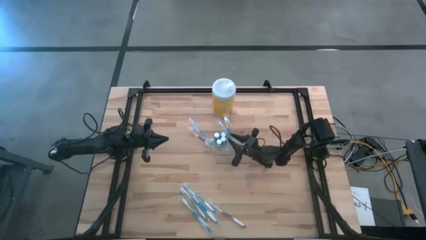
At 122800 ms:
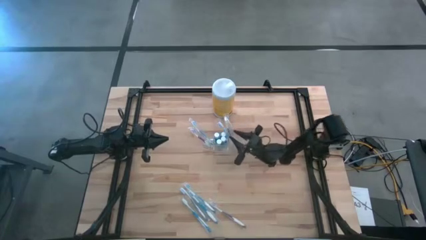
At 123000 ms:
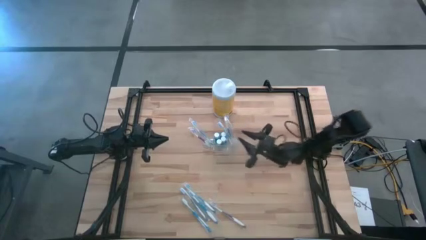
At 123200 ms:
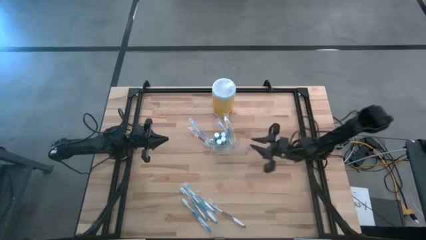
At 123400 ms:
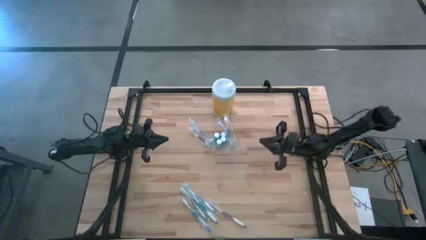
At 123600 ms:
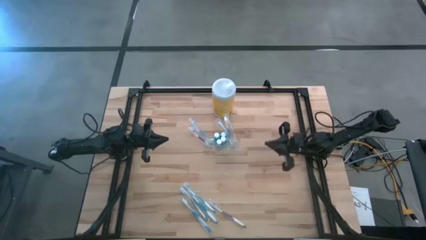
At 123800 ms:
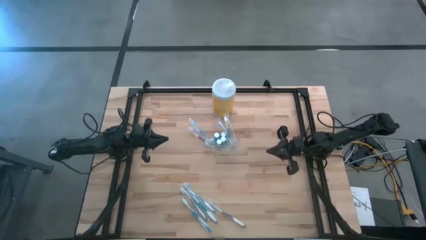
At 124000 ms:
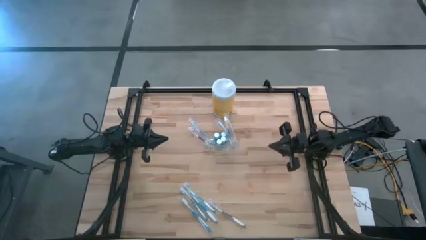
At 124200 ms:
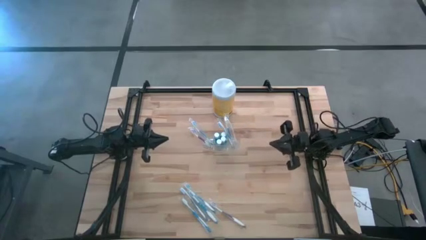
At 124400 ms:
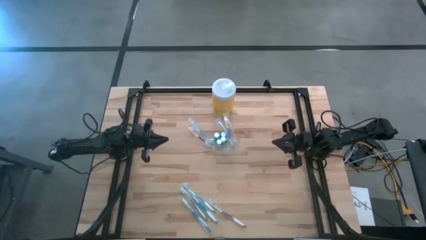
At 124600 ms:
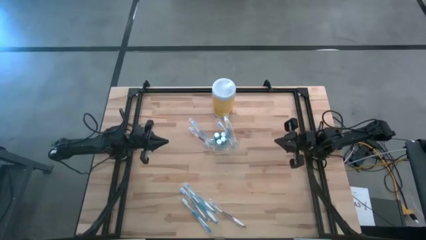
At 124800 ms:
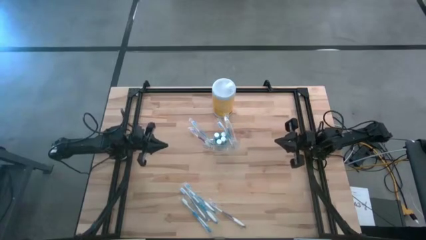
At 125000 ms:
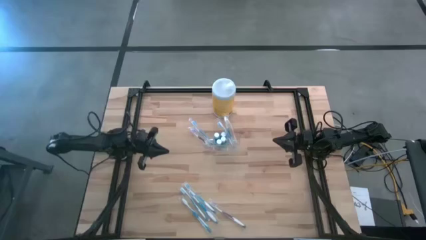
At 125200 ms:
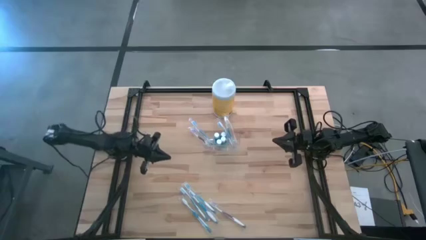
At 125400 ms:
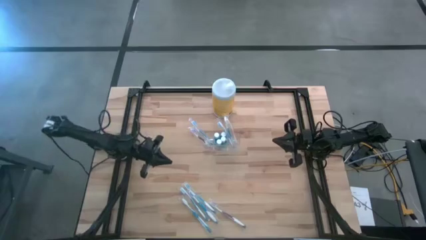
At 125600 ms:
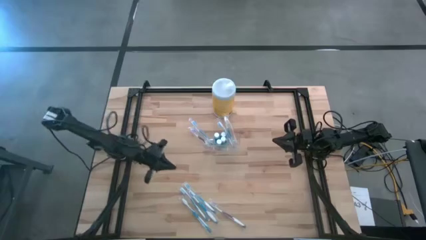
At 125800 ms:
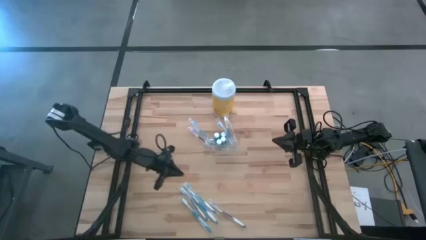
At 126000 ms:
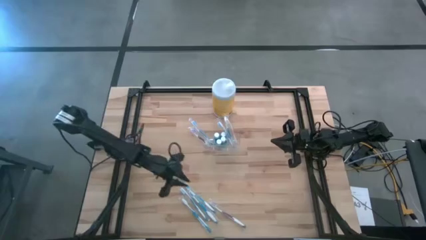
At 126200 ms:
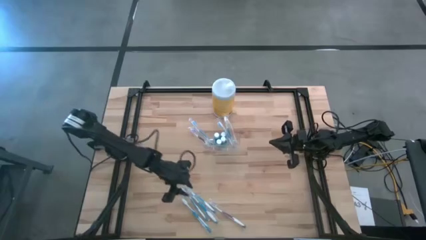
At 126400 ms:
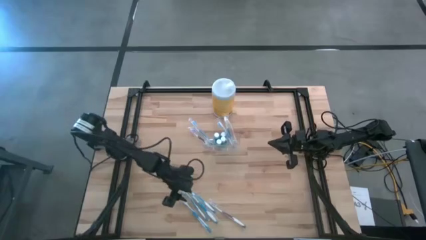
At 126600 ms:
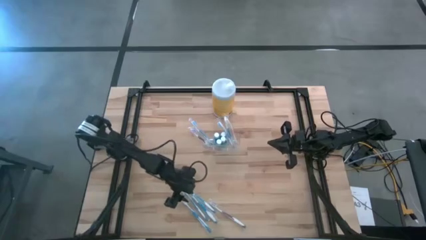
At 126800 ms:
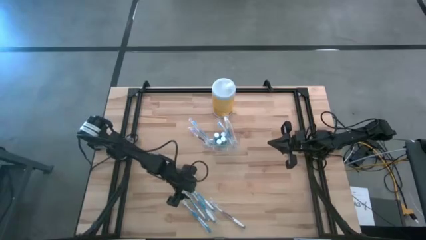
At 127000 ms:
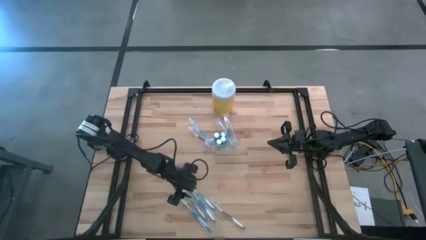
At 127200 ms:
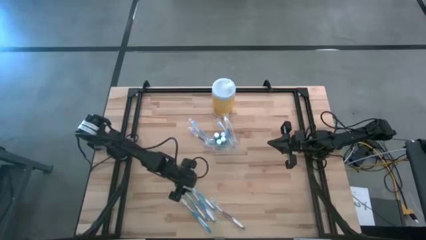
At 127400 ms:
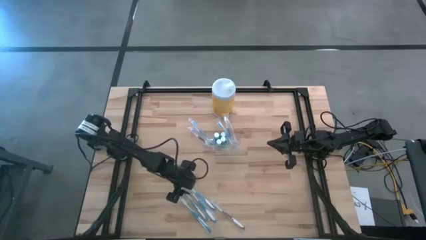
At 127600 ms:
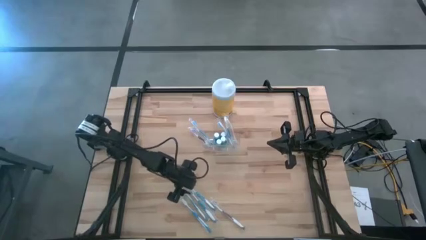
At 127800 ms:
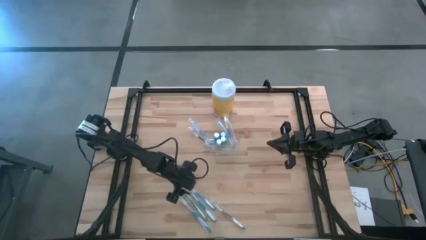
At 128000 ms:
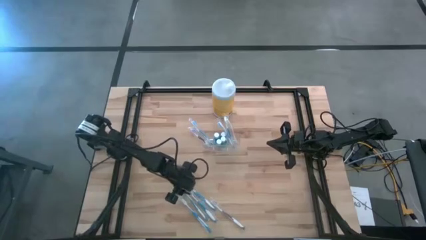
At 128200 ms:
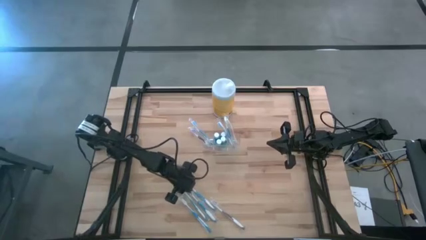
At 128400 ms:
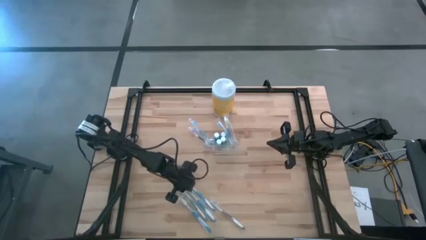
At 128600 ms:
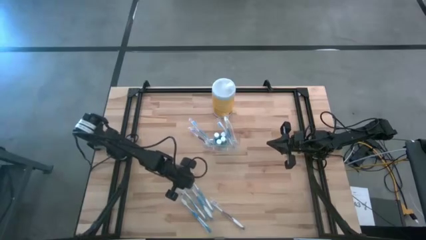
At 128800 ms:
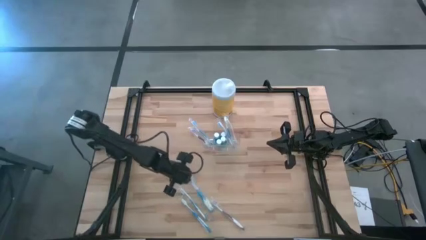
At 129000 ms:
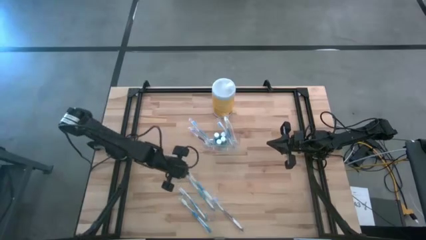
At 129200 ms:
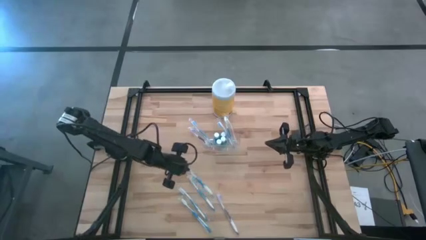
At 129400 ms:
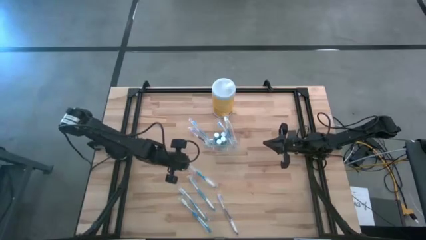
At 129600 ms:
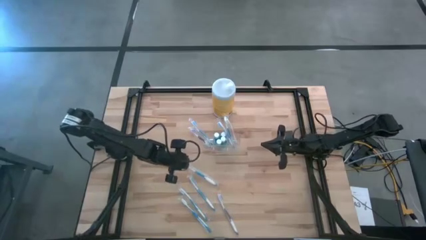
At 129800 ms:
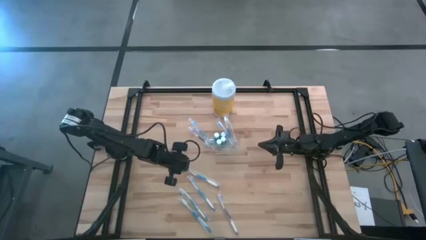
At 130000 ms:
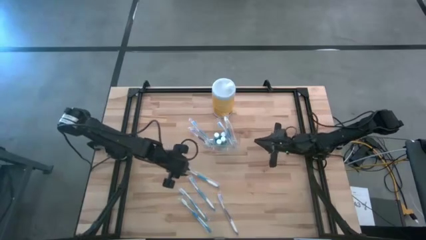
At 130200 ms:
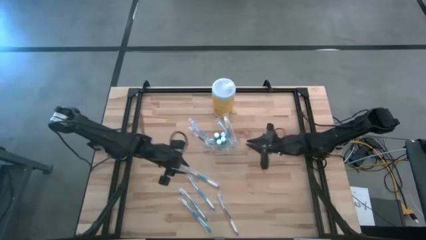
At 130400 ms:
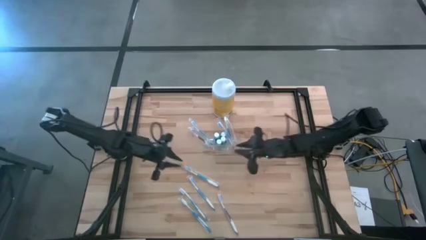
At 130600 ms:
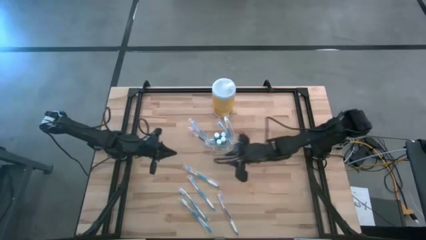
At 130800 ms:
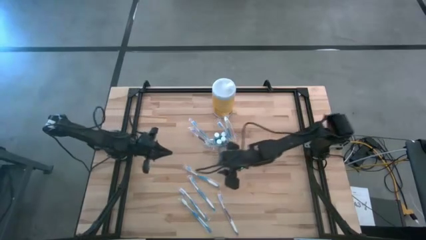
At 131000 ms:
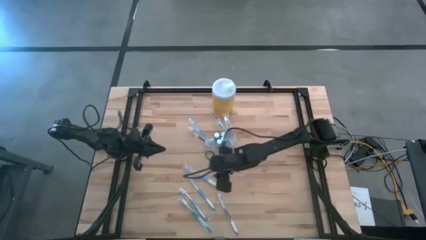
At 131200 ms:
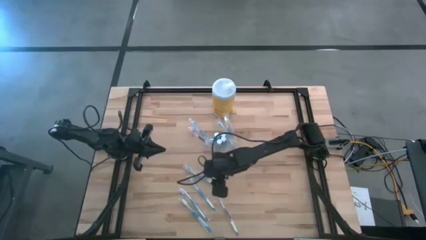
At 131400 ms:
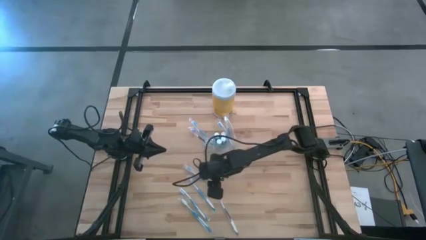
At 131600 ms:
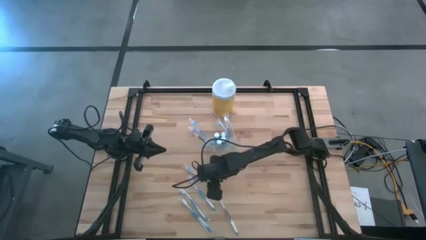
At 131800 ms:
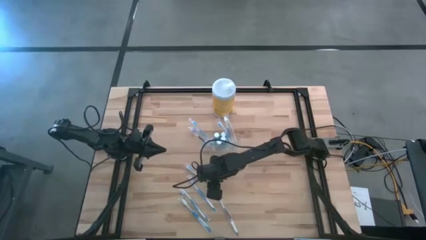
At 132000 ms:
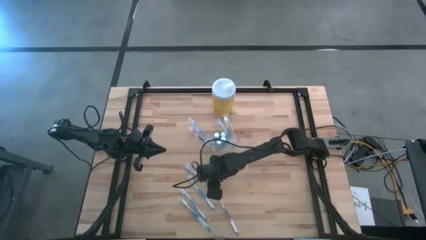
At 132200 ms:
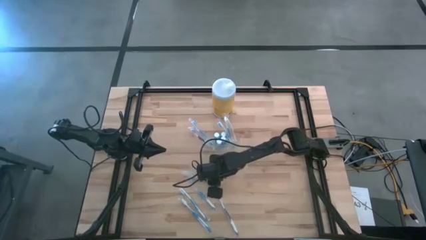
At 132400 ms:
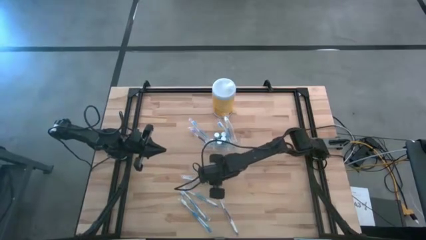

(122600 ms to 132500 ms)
Task: Pick & Place toothbrushing station
Put the blue toothbrush into the transparent organizer

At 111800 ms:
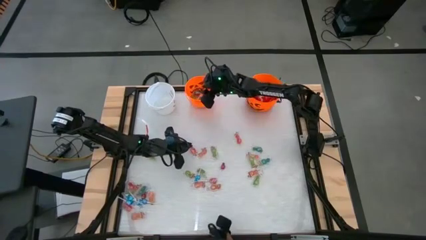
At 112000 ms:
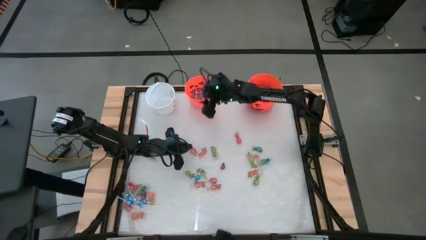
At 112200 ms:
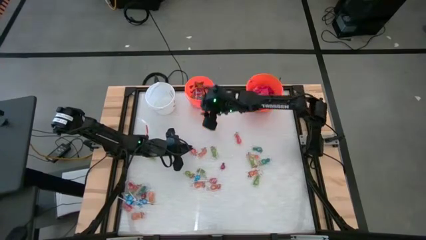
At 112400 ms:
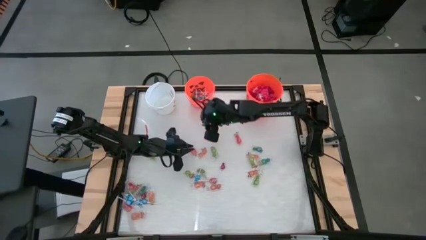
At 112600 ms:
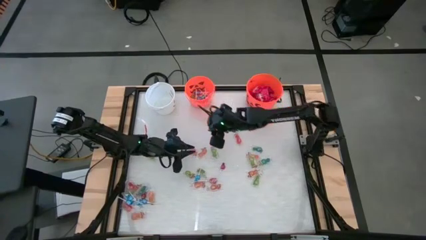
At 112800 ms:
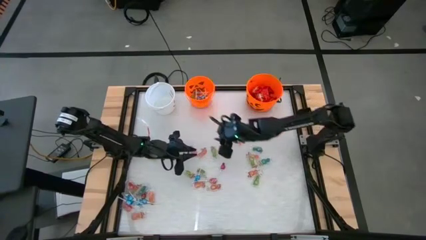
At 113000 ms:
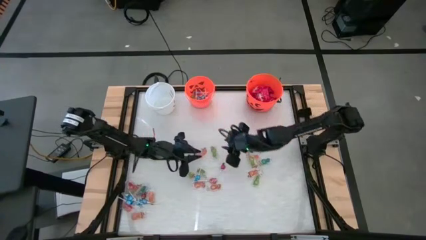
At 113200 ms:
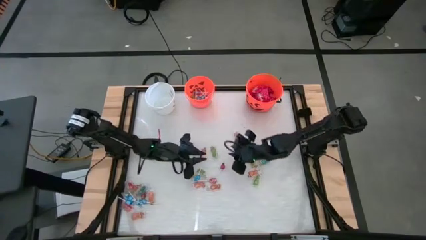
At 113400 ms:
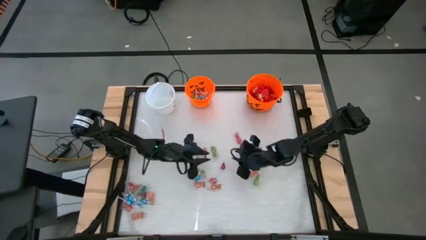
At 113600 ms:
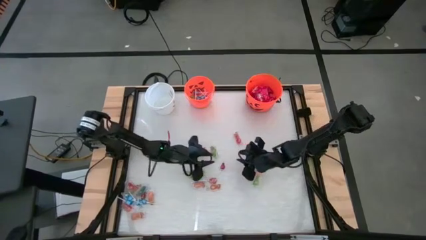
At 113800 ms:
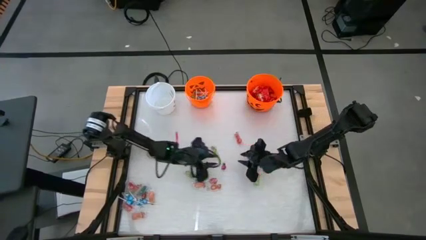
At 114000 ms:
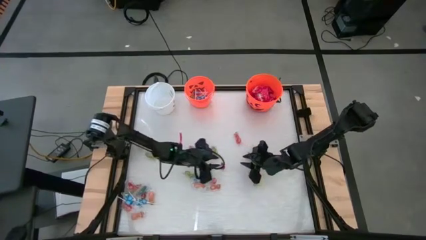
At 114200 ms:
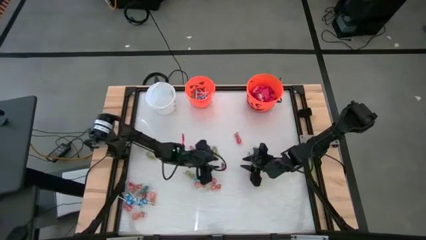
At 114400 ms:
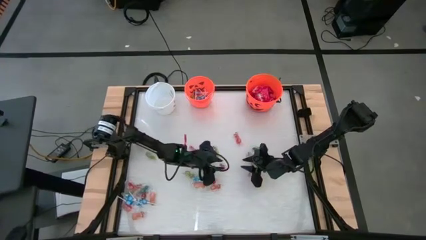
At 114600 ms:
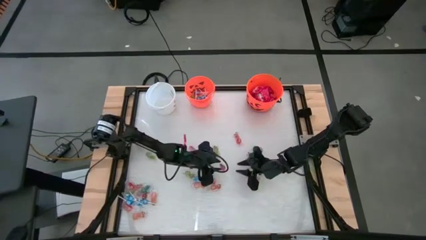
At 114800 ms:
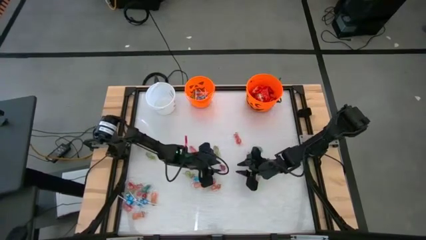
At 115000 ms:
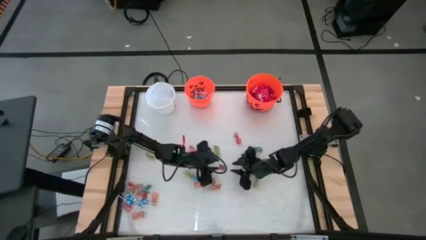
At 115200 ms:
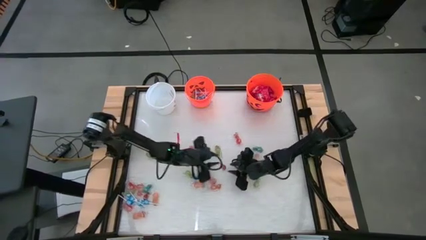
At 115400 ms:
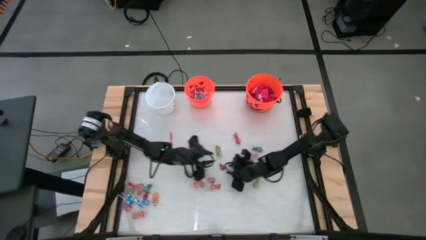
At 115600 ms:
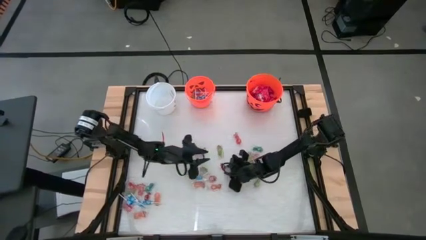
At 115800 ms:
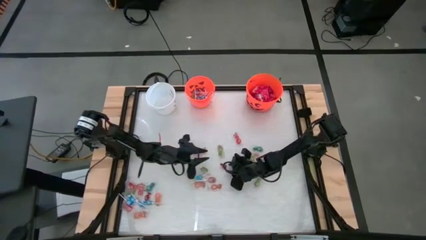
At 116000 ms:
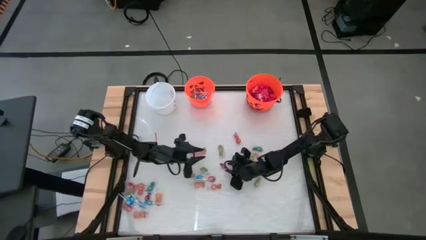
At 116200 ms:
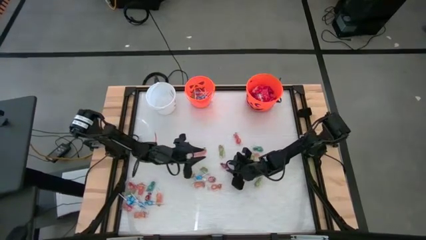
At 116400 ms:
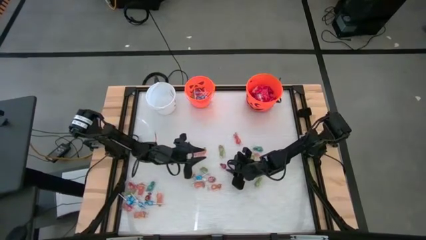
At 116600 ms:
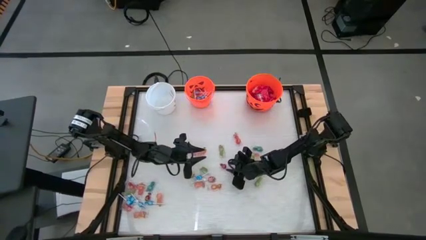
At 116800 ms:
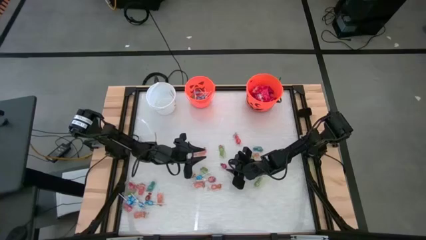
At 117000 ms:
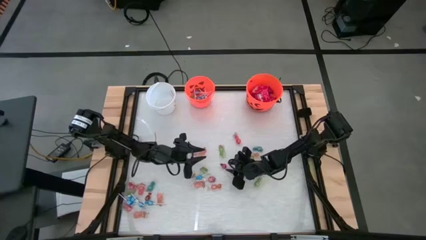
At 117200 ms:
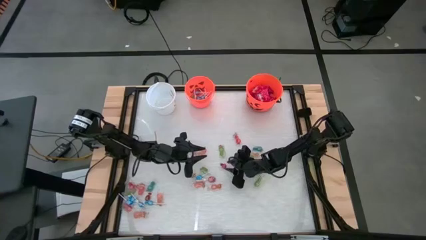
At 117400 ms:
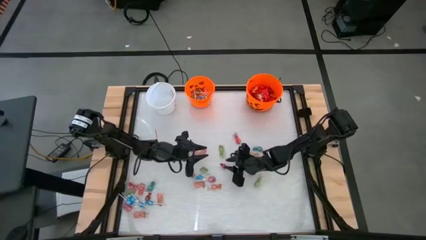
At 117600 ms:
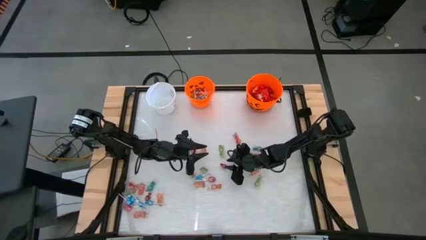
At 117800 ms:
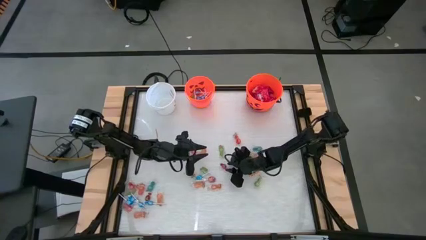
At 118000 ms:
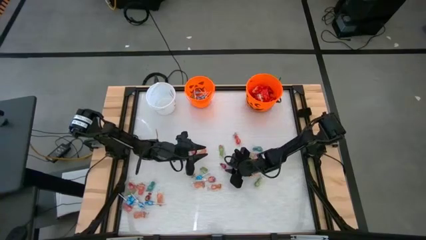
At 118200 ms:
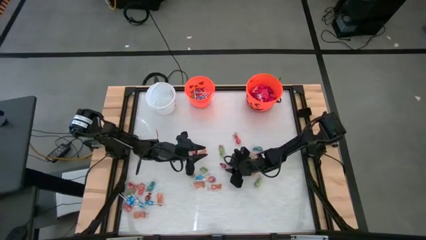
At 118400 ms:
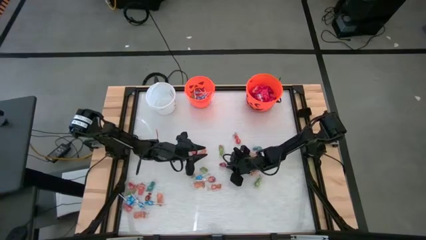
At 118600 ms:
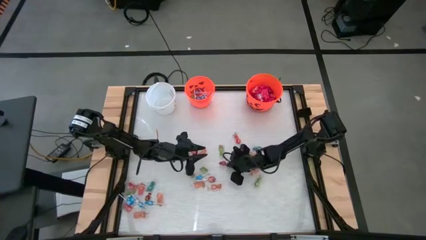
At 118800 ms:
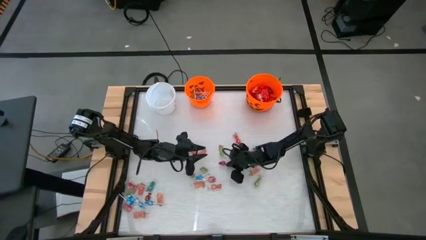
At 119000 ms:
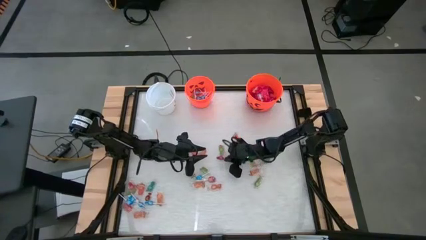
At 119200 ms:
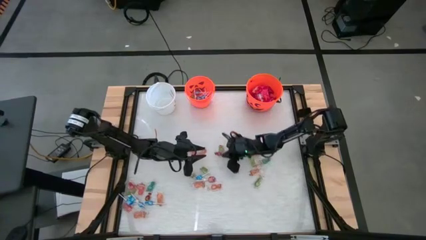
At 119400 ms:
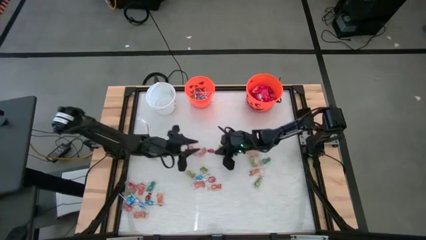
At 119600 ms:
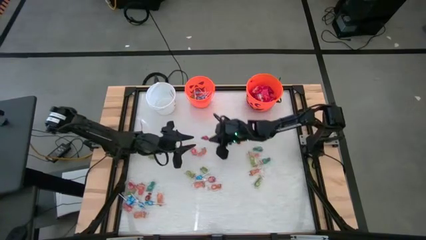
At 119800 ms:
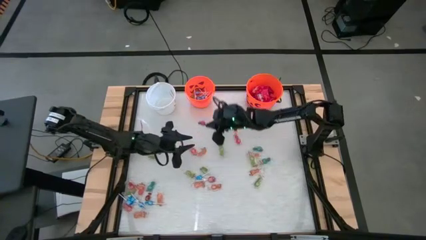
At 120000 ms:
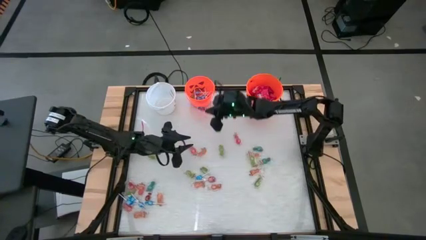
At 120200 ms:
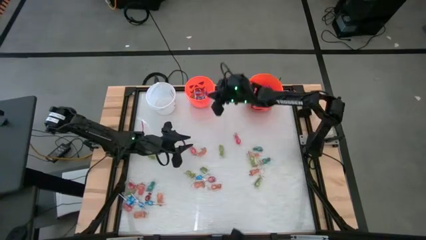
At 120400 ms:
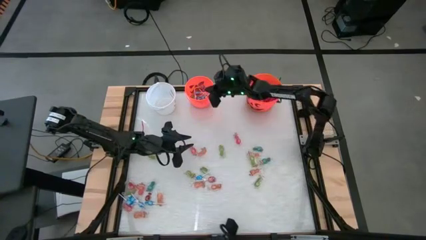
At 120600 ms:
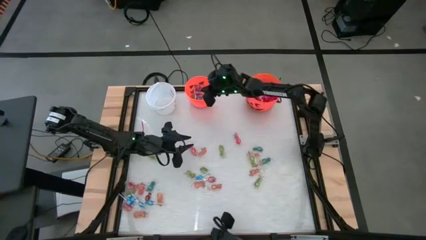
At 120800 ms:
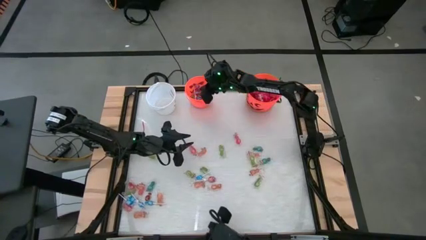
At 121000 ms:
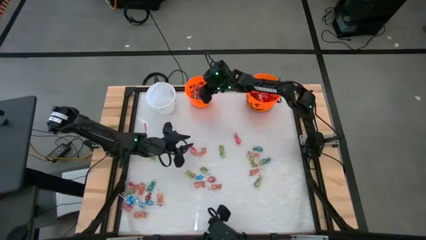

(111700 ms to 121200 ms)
Task: Sort candy by brand, put in halloween buckets
Put the red lollipop into the left orange bucket
